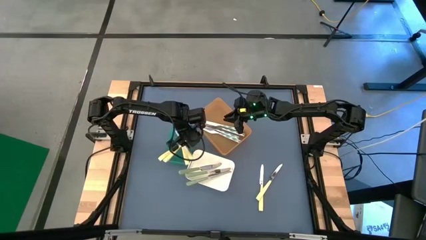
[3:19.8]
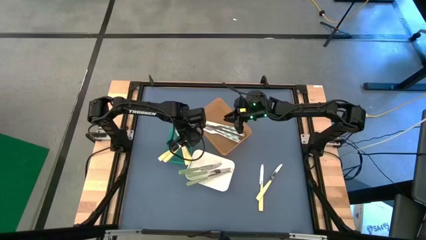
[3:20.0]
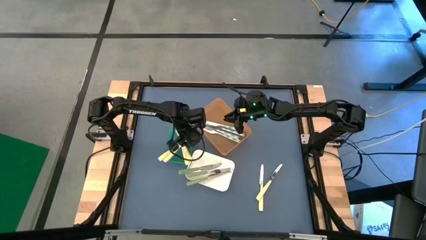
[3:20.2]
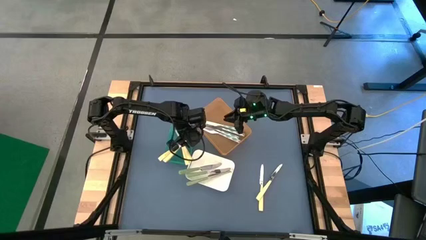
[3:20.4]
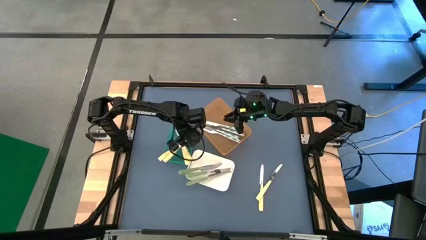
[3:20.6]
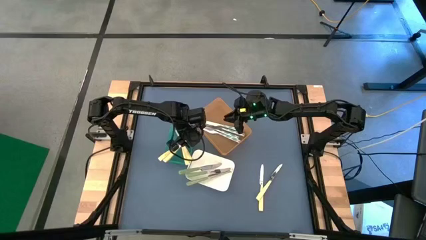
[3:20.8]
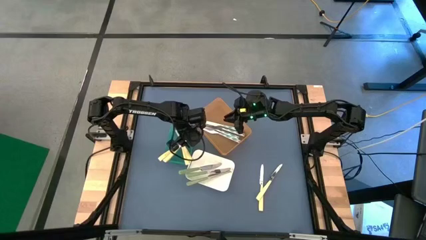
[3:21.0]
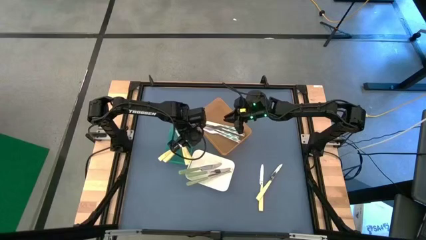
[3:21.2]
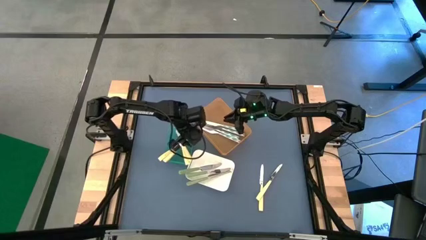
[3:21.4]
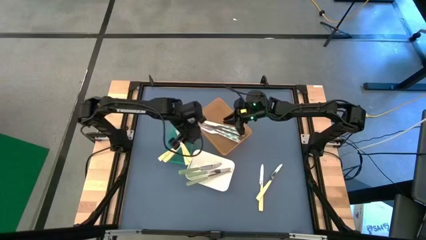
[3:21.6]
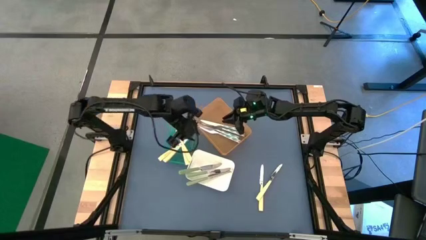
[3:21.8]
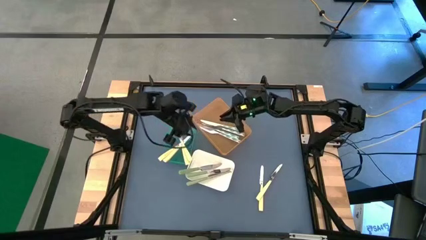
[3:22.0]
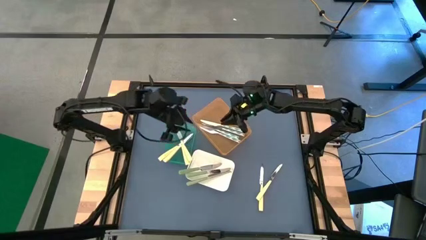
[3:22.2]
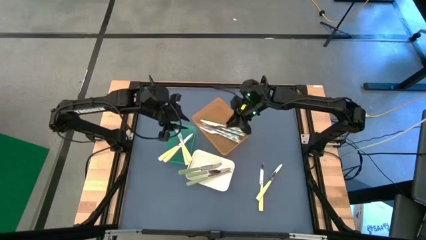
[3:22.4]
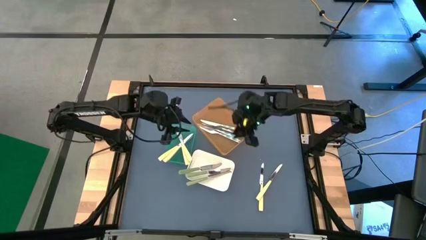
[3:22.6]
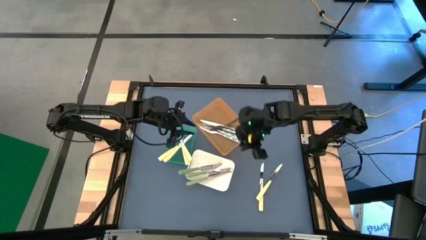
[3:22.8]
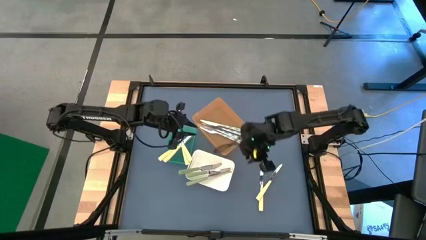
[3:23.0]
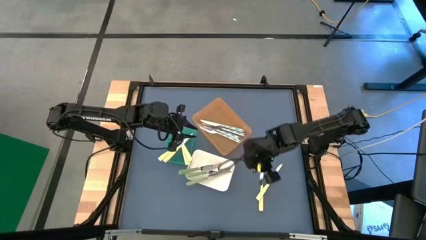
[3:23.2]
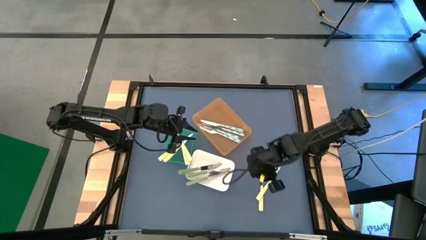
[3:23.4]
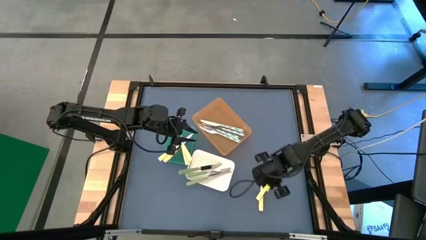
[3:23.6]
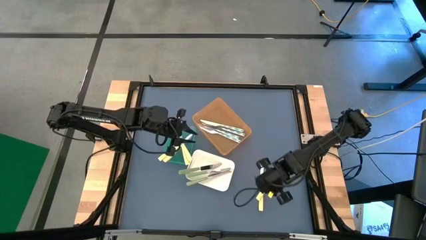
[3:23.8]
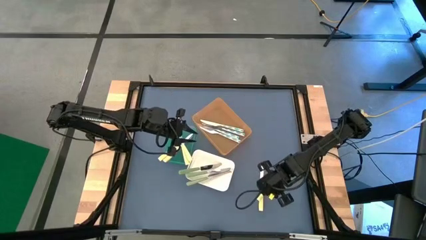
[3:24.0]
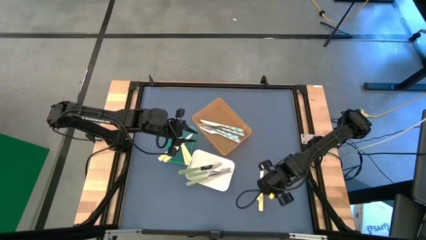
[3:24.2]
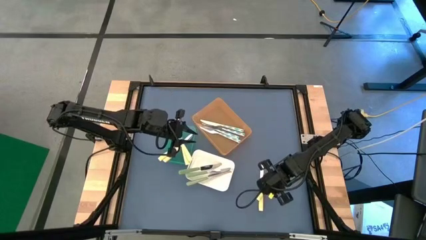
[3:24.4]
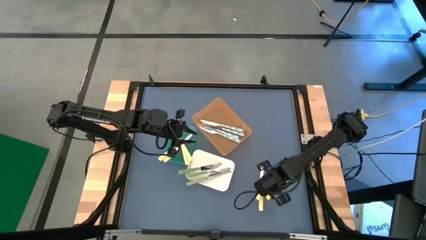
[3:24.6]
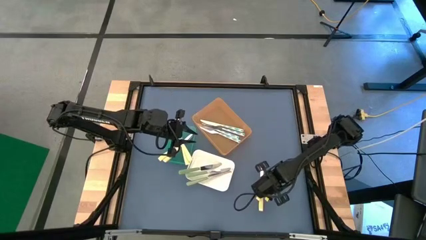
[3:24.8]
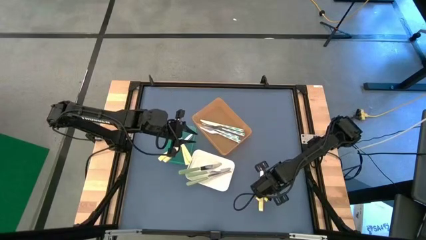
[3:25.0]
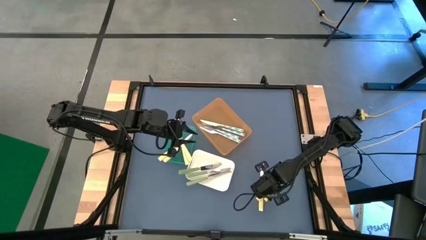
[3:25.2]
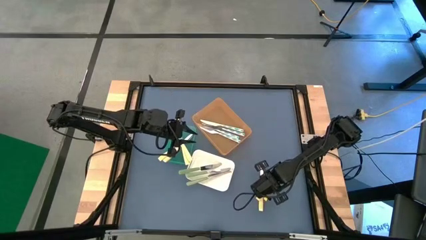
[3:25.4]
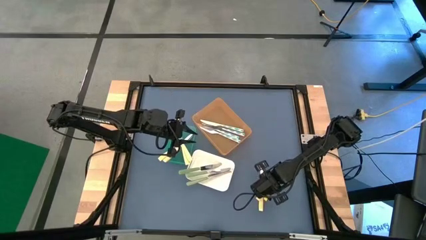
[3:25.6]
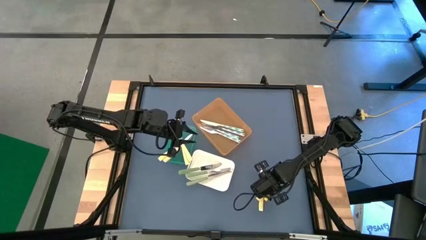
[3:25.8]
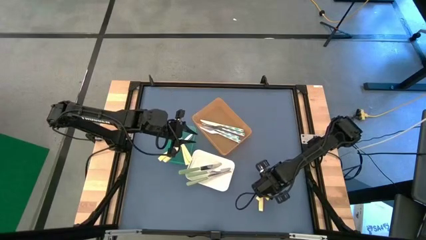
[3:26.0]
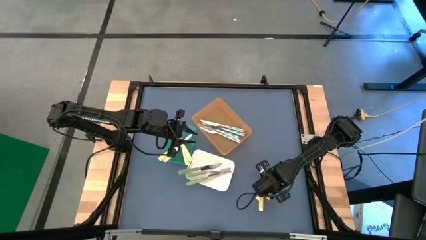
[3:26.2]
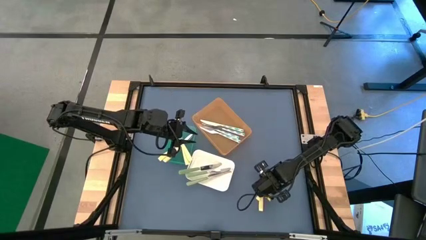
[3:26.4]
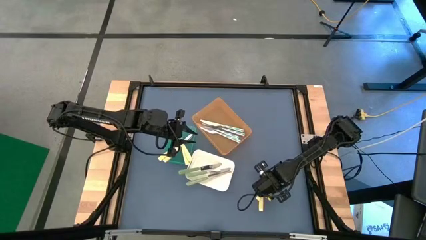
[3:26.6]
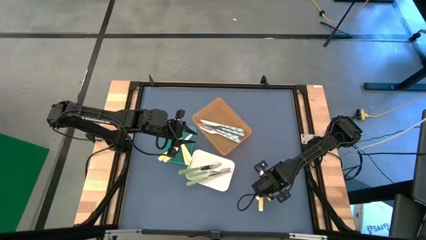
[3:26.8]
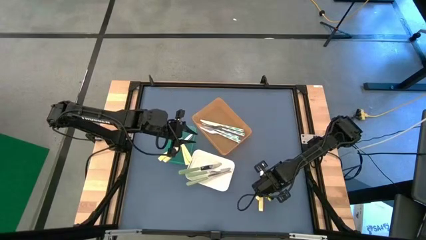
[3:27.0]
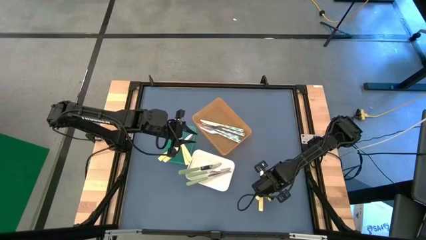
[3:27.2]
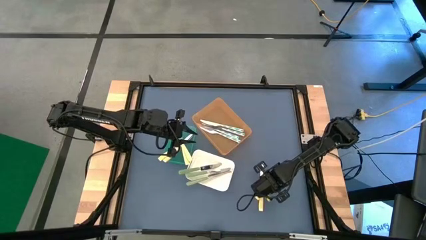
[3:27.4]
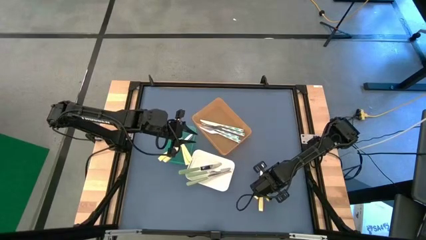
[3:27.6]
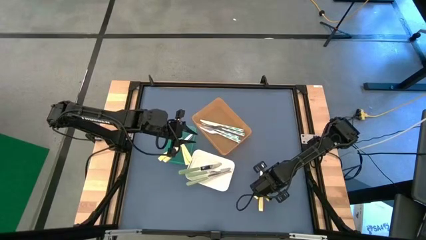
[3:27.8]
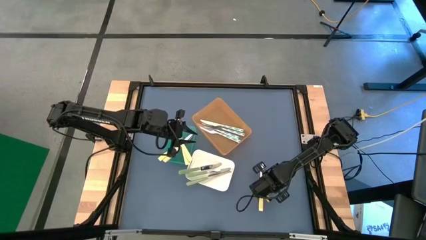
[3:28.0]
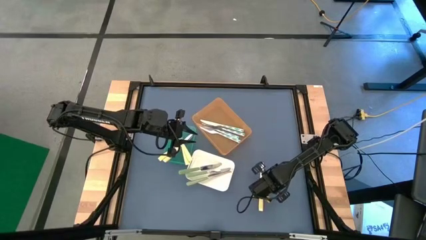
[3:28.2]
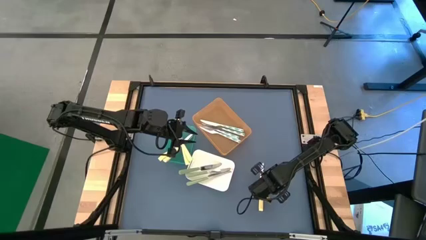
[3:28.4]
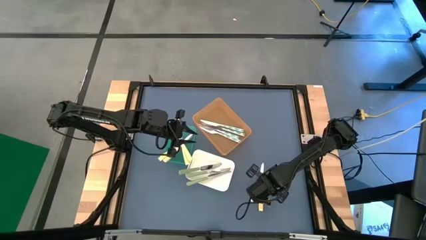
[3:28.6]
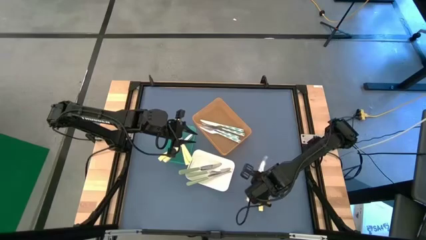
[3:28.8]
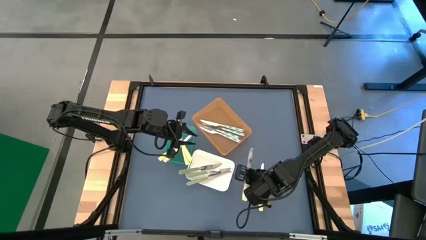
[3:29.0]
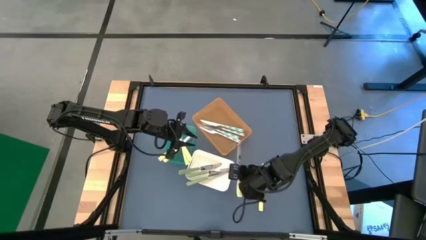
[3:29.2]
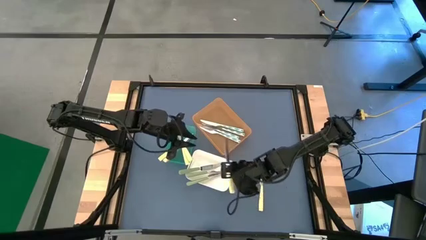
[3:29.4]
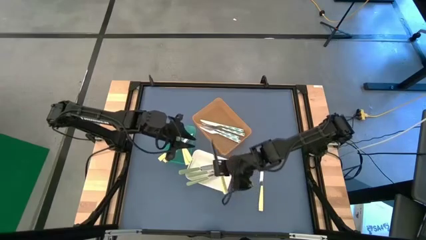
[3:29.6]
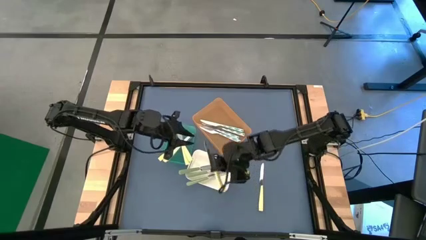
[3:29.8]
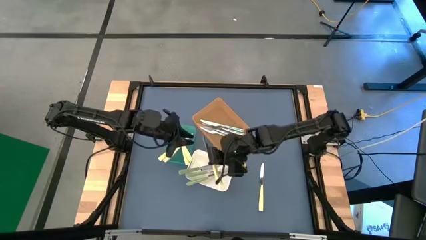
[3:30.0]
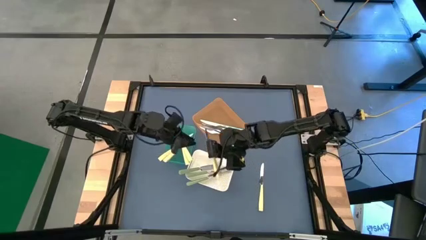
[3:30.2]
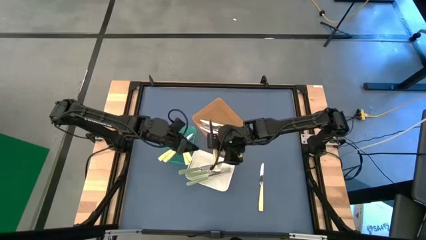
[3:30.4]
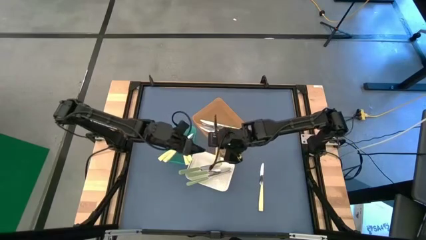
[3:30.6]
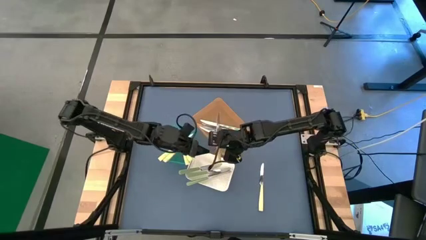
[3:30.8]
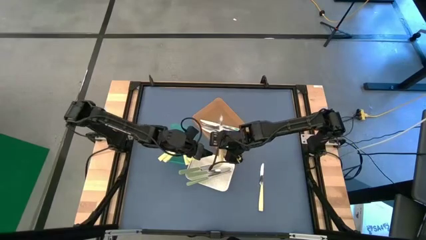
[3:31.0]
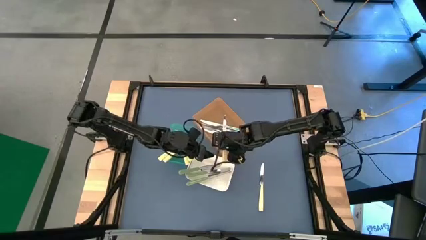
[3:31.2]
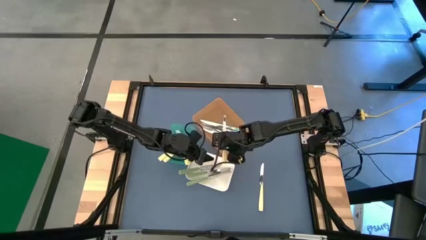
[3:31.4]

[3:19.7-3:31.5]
Task: Sort silverware by color (type)
Put the yellow table knife into the green bin

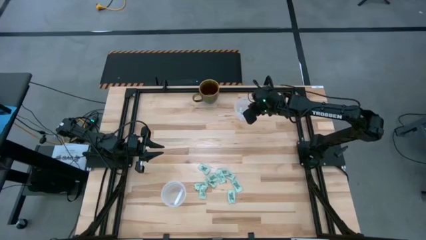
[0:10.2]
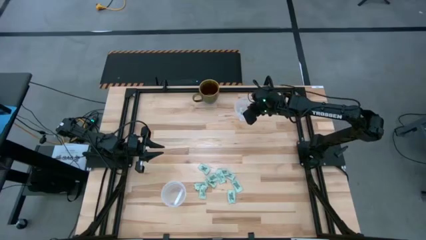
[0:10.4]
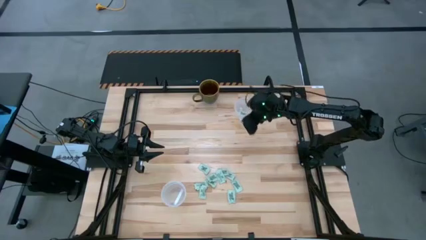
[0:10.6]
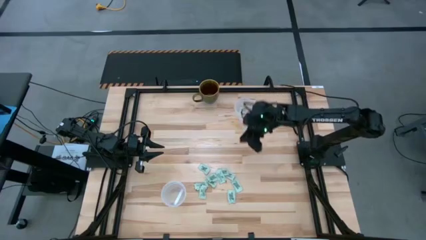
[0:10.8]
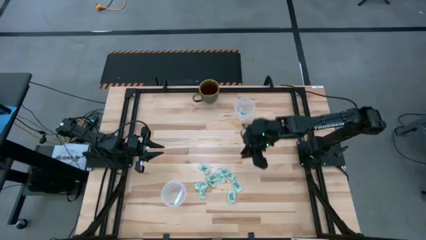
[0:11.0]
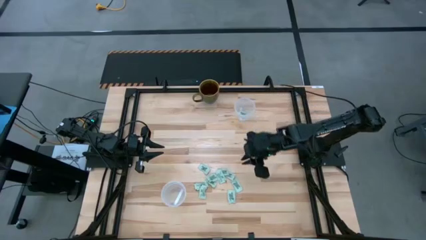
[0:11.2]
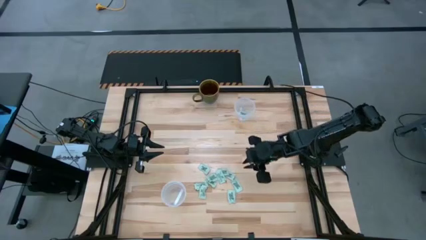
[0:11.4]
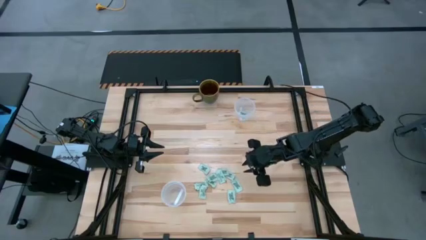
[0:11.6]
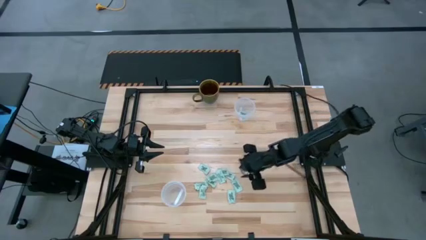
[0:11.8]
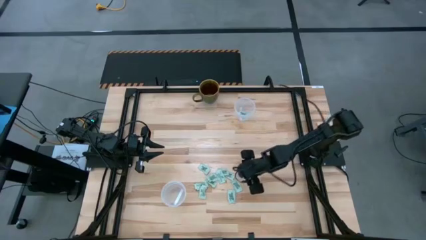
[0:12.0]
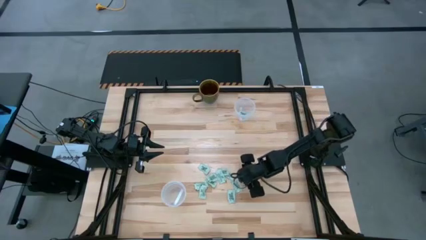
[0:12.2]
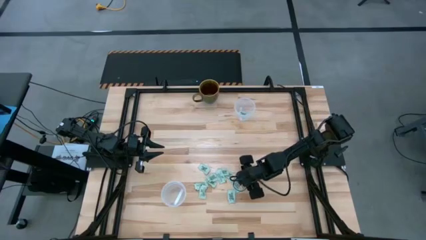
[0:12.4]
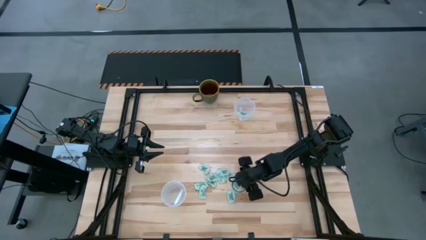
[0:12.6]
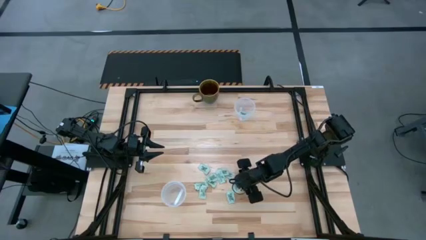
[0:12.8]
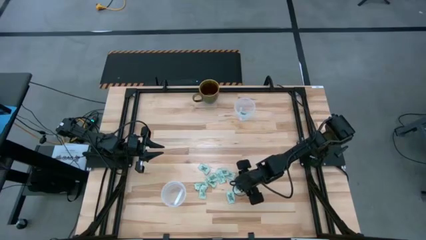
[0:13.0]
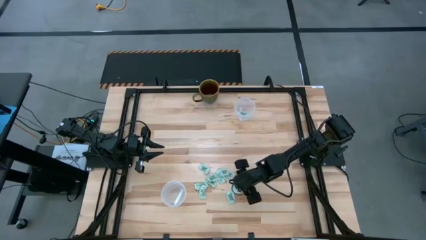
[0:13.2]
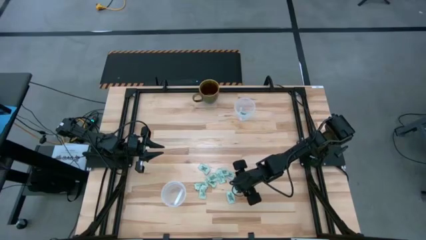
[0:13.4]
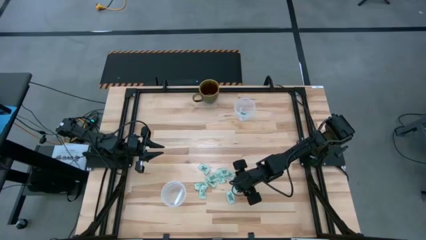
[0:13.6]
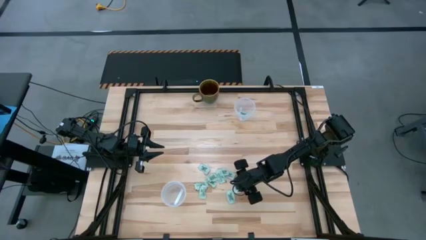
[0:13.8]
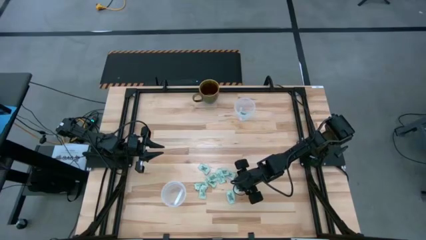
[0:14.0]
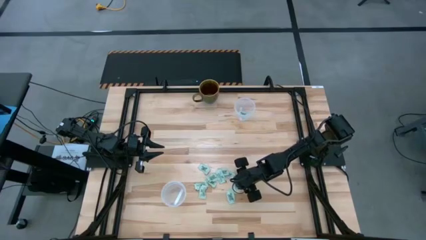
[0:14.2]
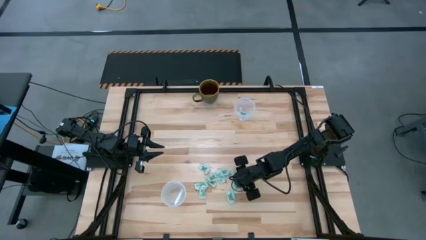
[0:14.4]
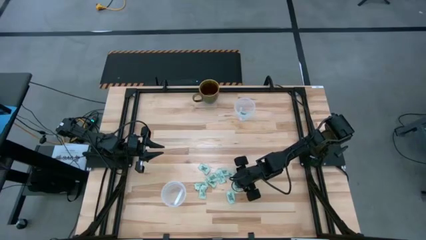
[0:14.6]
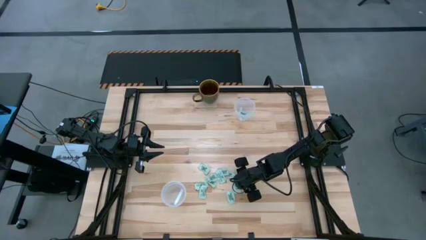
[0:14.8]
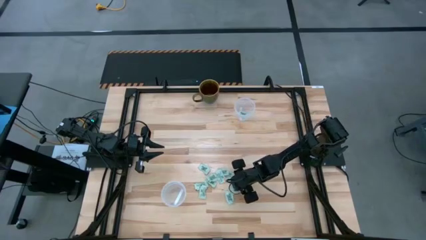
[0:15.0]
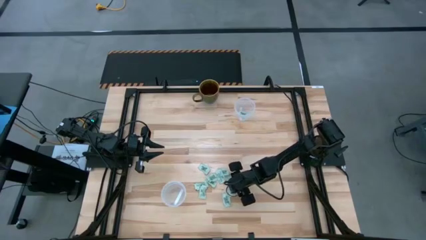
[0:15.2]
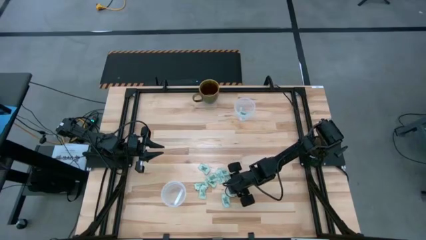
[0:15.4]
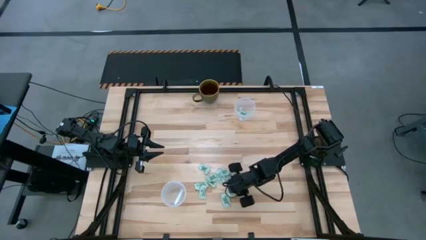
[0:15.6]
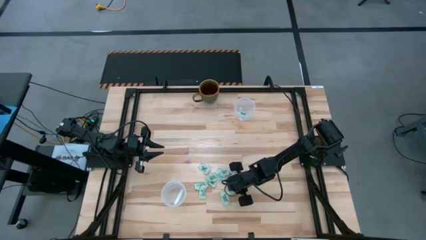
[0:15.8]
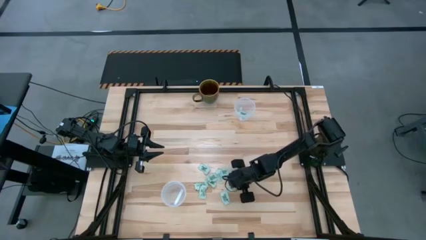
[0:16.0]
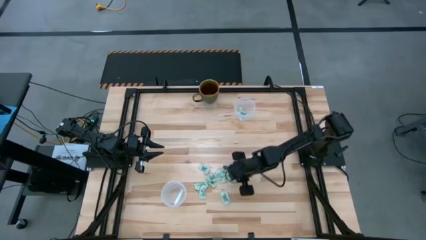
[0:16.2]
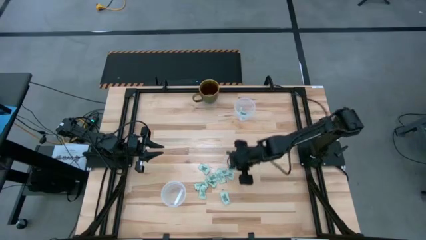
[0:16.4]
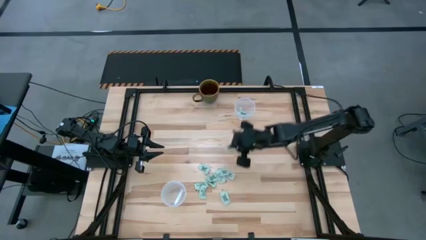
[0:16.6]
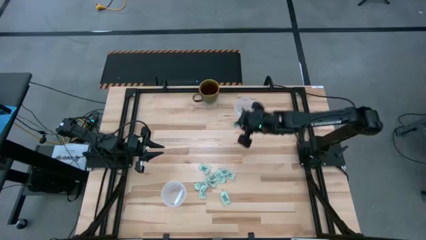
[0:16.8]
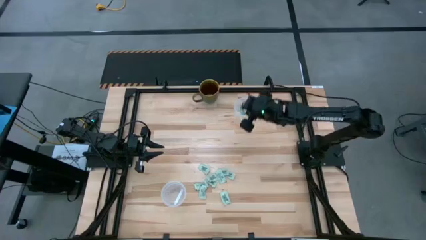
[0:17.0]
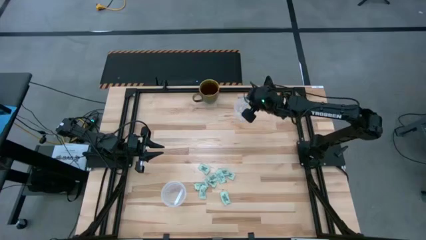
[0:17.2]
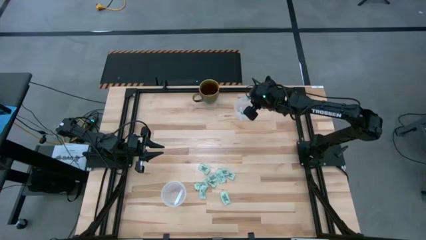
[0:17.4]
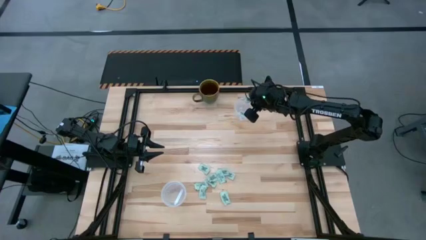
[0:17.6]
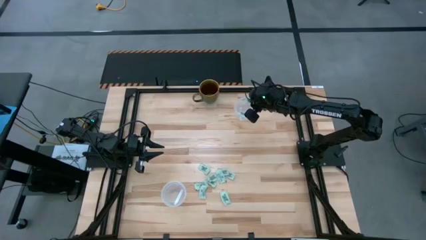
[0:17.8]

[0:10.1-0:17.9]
Task: Pick and place items into bin
Put the stevia packet into the top transparent bin
